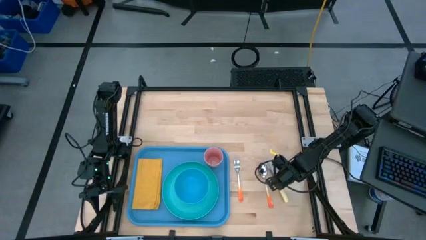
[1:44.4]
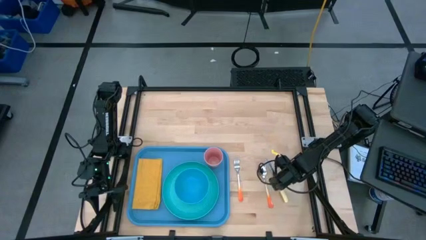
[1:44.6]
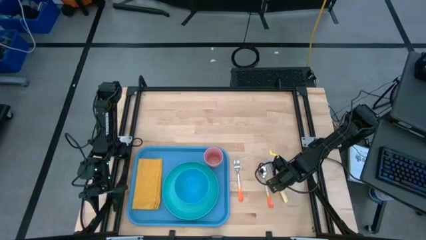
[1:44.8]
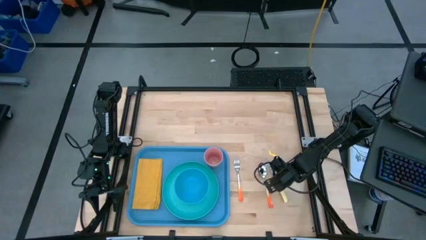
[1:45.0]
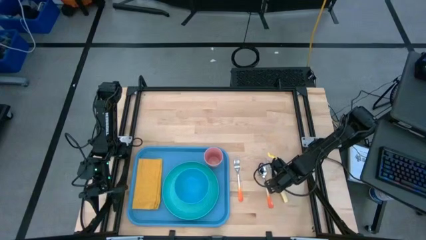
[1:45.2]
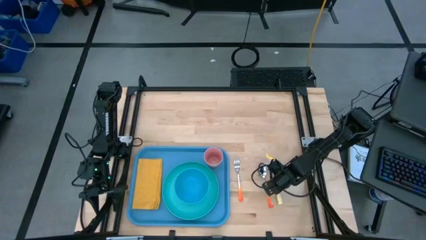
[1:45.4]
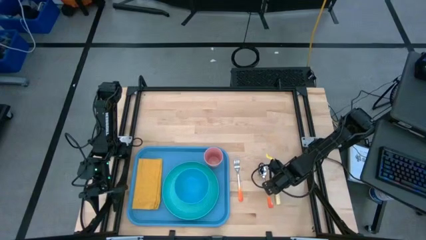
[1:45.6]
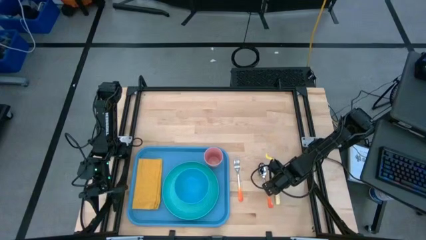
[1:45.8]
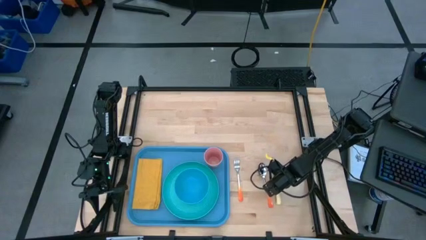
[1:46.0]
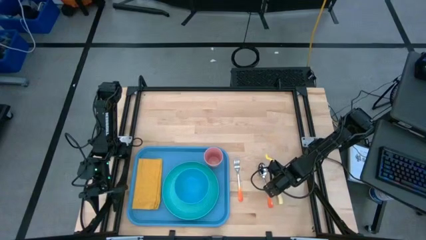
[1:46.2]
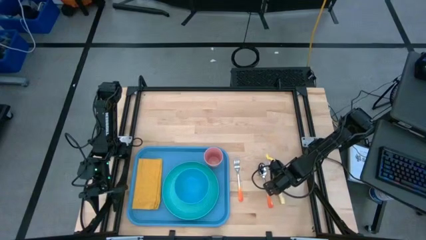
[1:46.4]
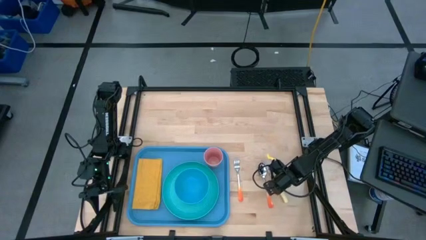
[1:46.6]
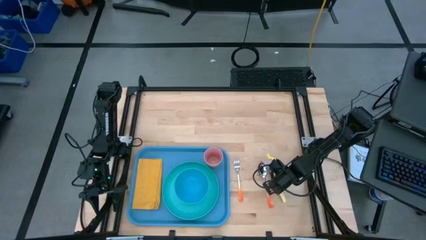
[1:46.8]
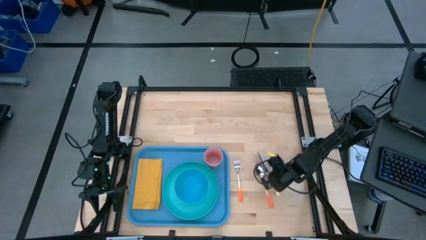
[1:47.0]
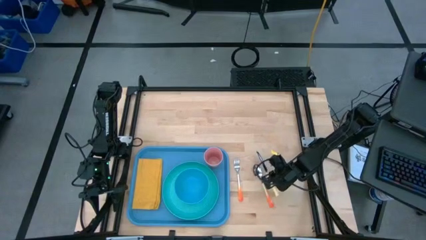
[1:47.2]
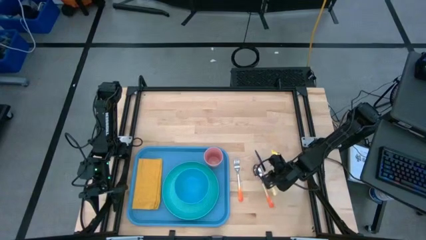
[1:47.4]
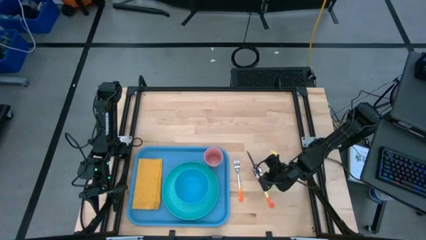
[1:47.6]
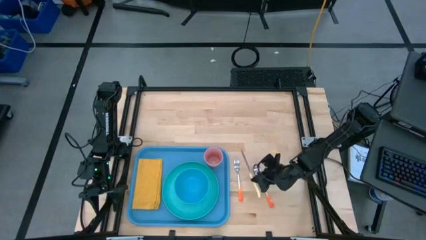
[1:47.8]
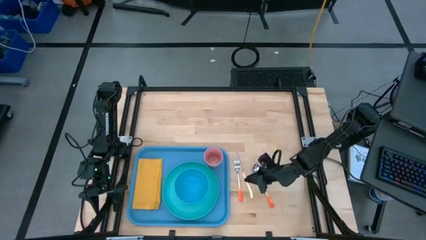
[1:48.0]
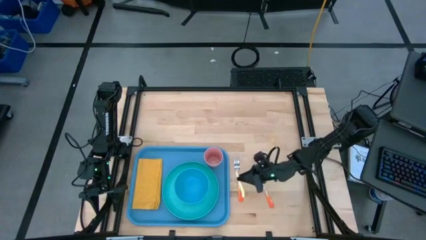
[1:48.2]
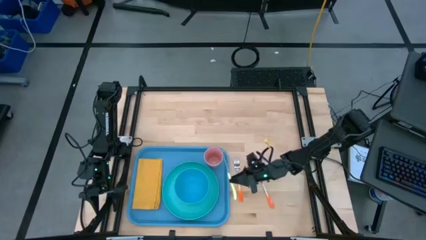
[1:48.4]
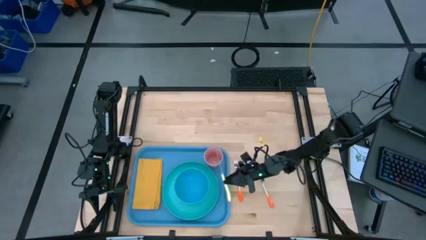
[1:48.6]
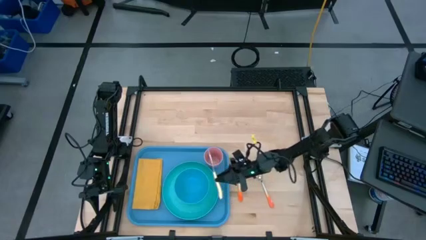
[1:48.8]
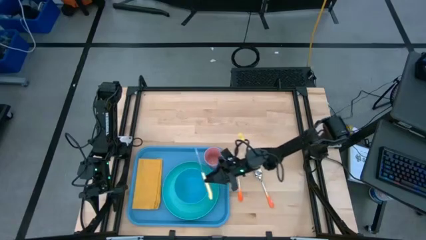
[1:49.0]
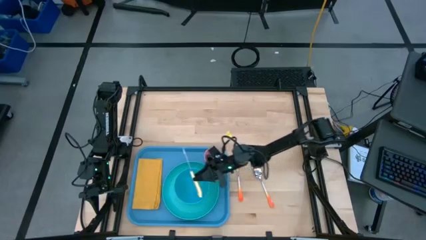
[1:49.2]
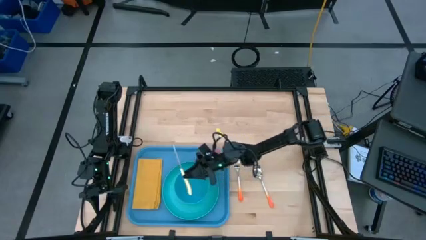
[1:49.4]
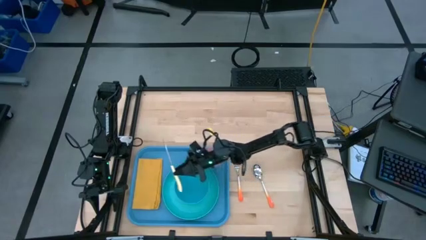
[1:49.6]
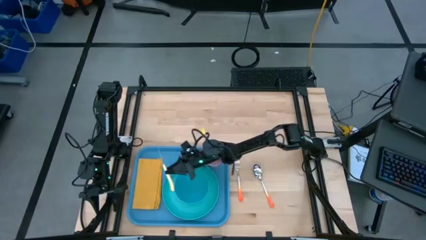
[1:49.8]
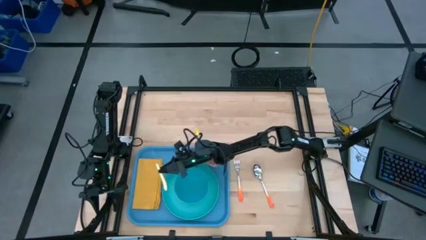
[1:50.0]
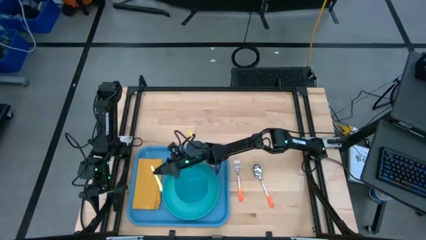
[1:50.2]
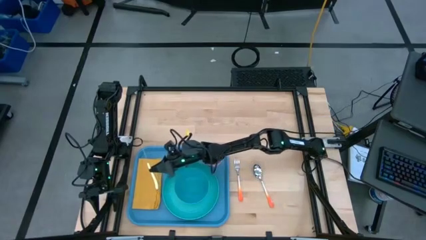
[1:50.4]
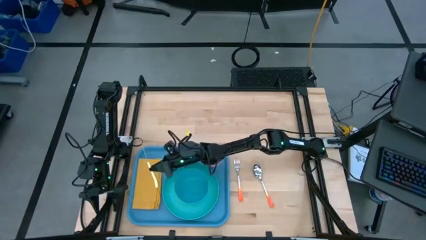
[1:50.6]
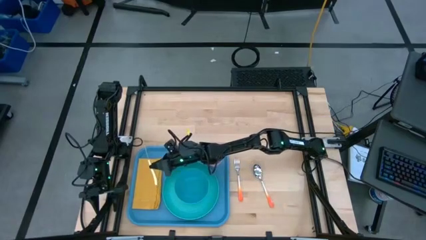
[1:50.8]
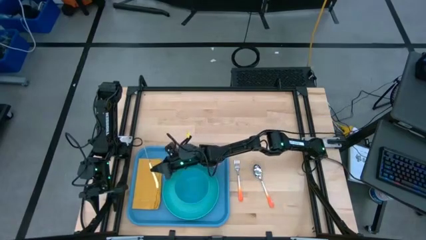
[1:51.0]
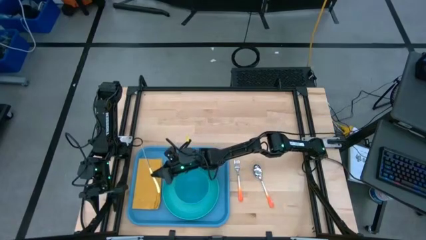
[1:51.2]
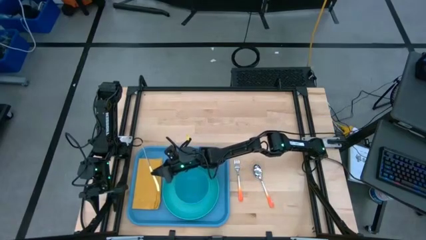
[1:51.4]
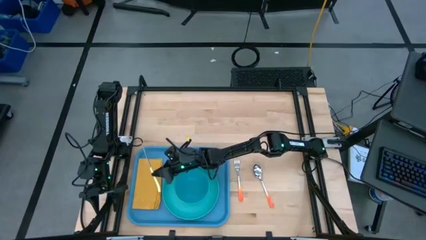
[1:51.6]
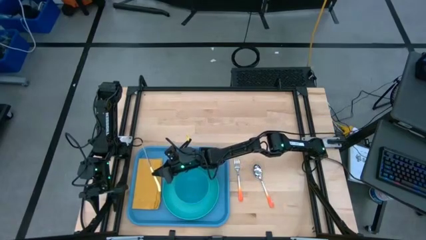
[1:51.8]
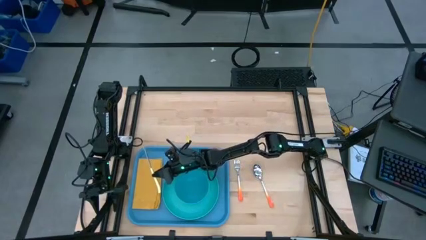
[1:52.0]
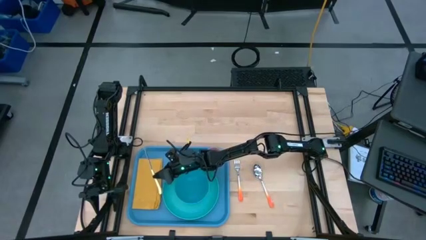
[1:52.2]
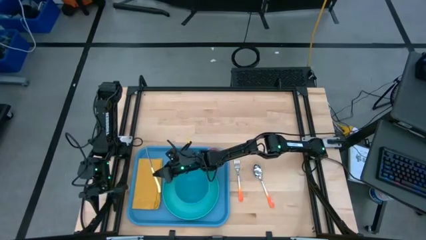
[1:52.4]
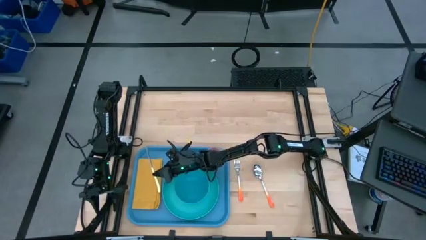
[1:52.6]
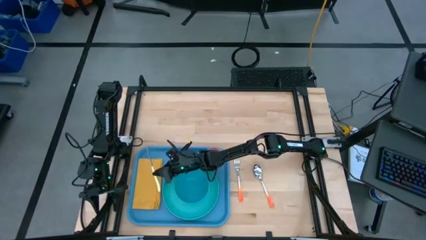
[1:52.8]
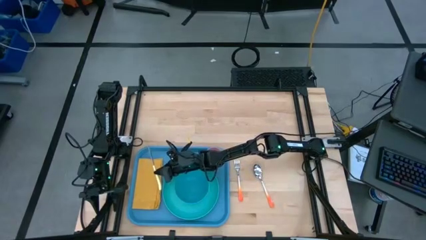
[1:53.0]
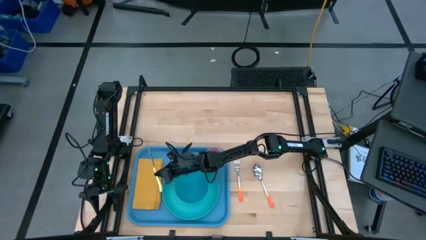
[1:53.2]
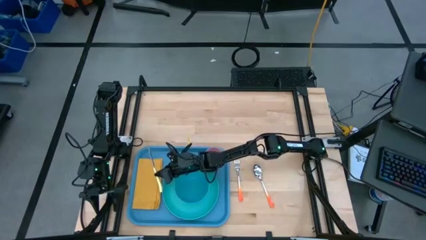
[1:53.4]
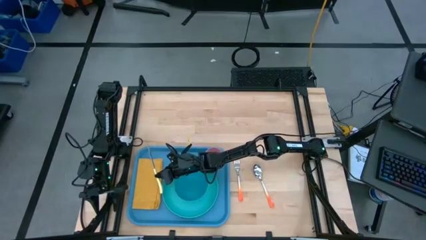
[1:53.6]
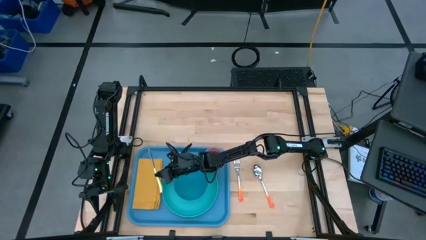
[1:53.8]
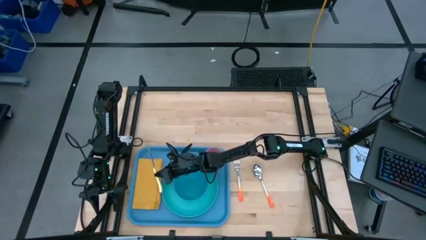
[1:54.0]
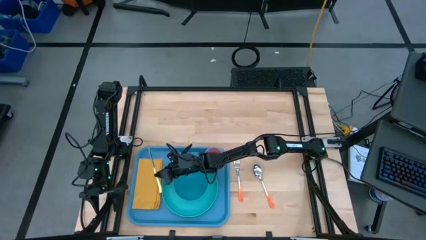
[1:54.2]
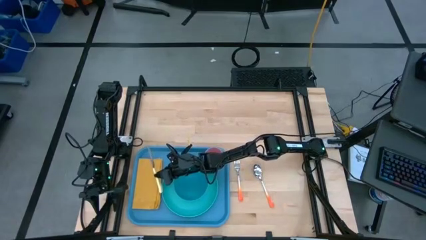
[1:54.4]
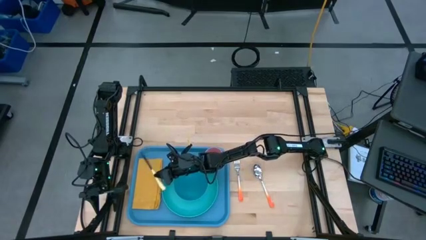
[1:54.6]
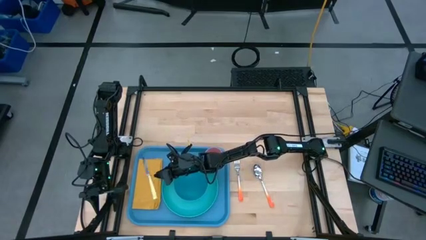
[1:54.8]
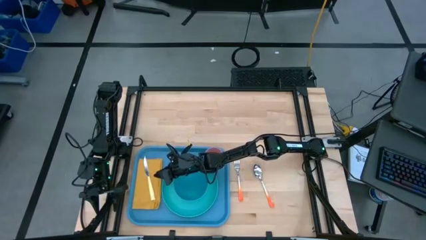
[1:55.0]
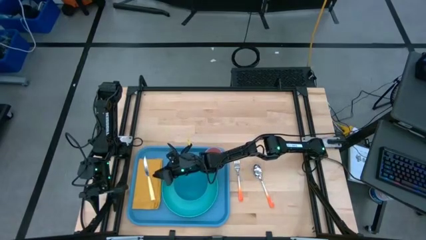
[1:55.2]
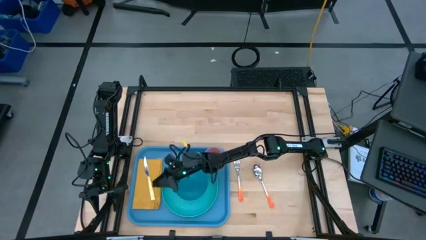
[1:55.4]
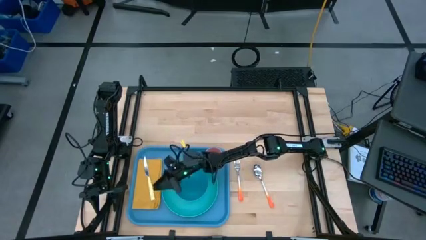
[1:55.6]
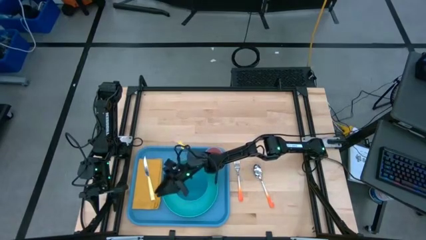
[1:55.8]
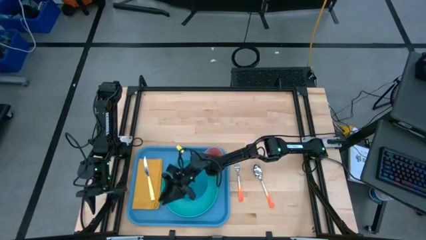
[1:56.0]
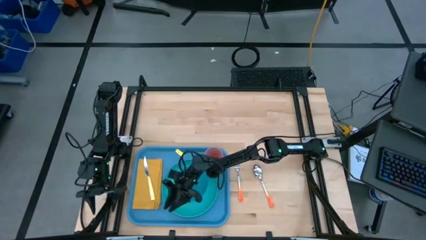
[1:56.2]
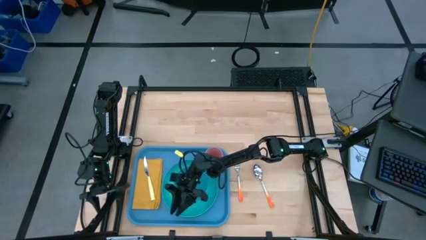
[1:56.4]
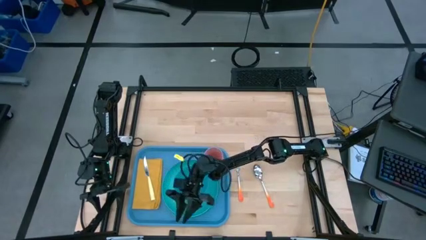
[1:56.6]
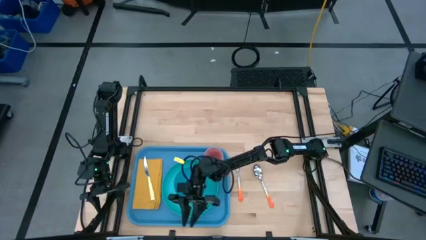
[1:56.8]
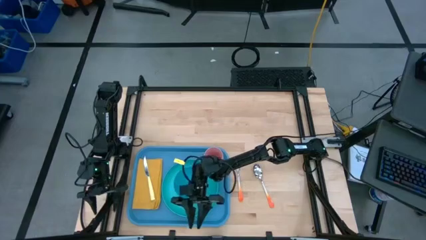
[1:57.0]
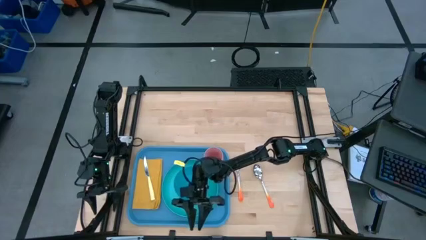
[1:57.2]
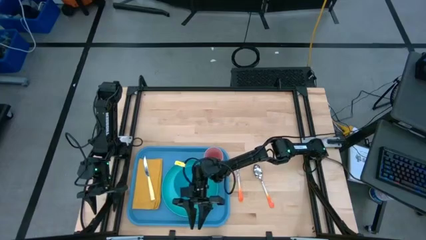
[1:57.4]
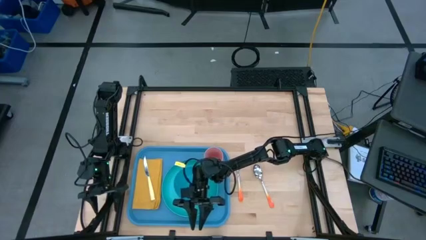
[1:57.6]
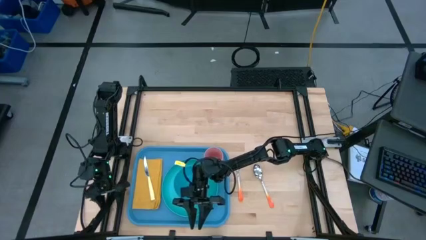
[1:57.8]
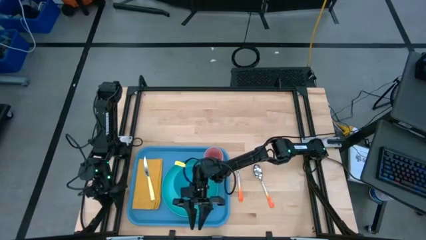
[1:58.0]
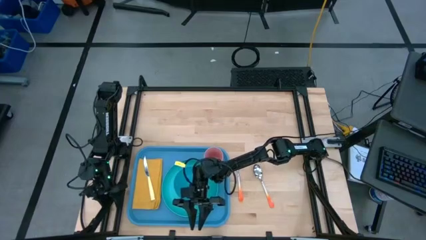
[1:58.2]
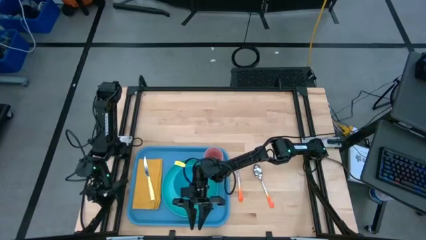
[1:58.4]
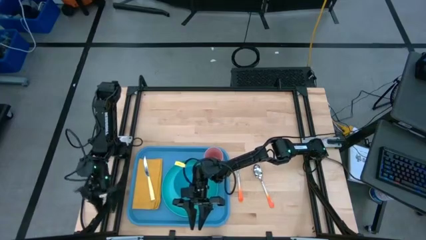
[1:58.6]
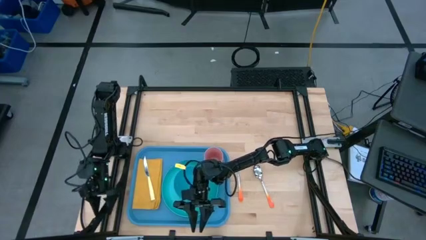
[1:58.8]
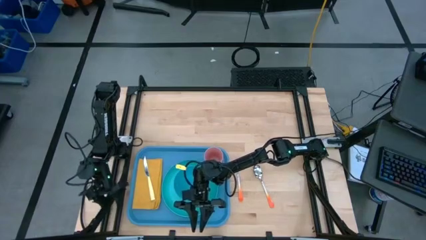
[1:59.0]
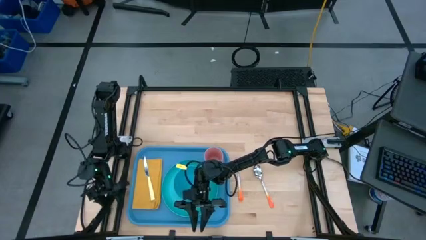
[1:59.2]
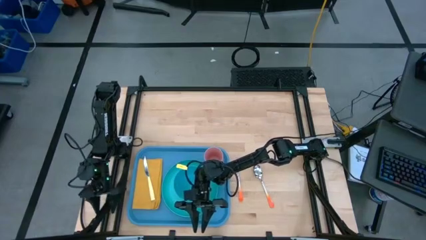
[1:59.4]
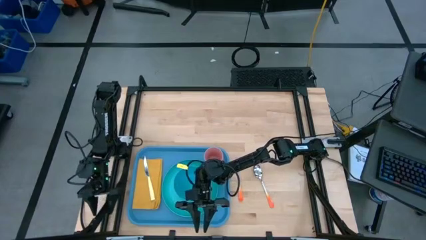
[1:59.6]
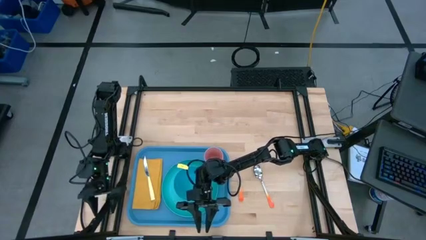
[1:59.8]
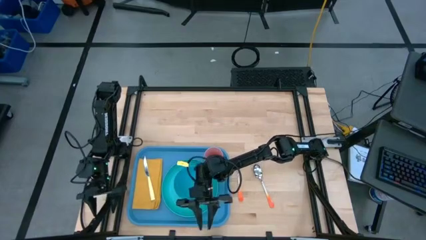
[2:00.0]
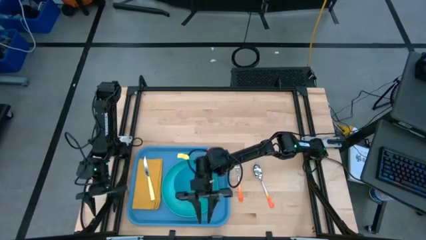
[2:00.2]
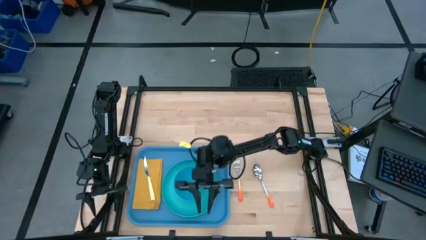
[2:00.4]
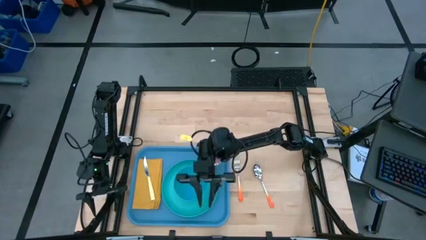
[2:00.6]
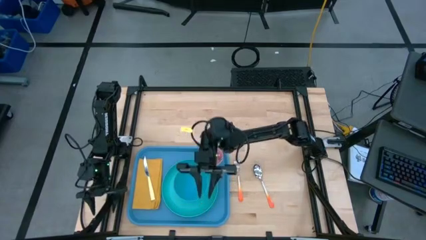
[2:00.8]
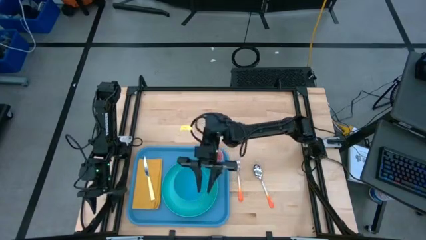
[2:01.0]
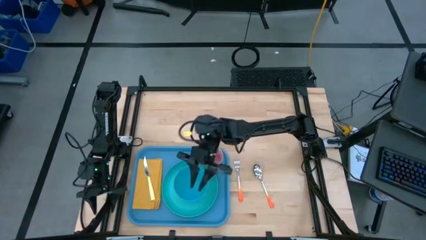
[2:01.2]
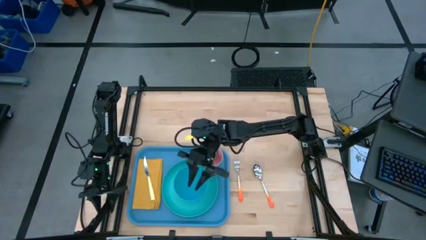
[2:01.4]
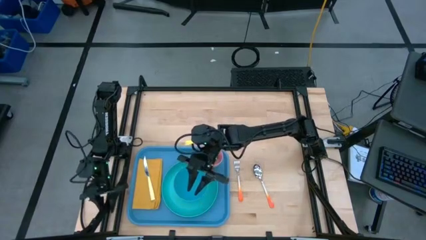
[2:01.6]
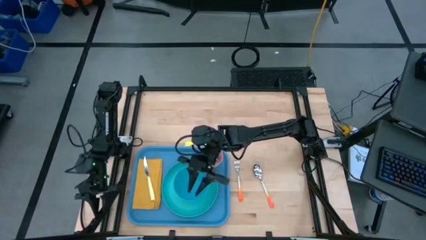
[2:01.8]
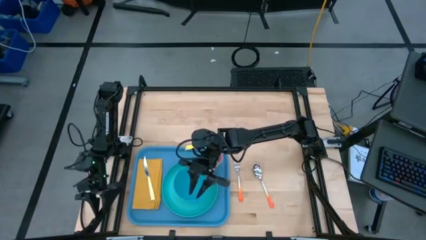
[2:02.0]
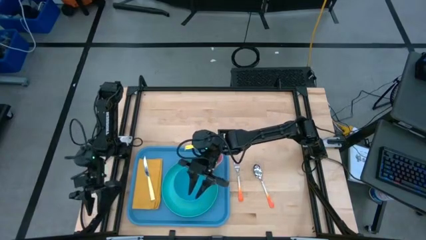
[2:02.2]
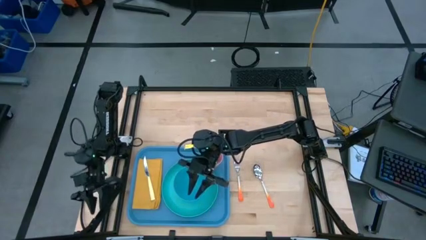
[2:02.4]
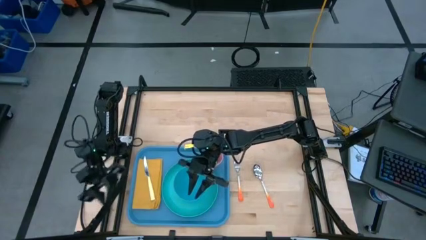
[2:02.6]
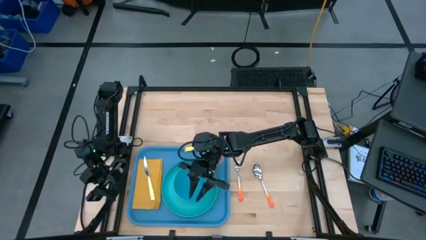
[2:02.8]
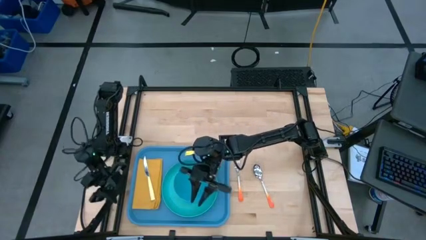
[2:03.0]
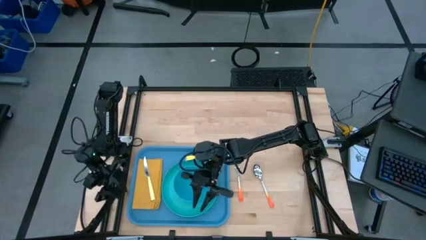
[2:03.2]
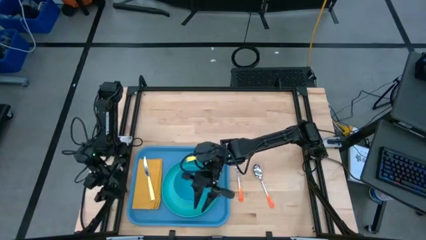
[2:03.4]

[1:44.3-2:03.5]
Task: Set up tray
Put the yellow table knife on top of the yellow table napkin on the blue tray
